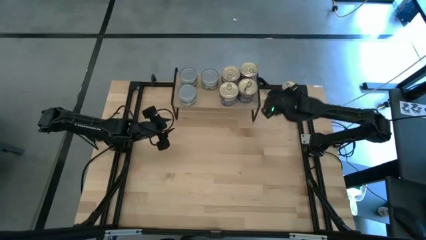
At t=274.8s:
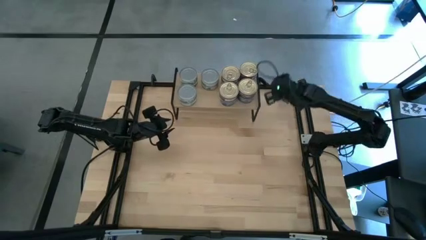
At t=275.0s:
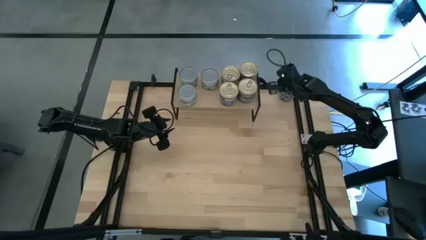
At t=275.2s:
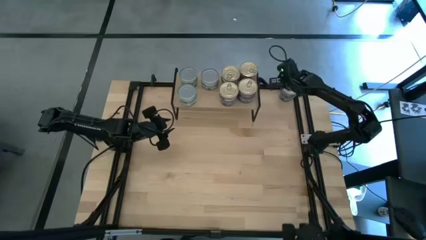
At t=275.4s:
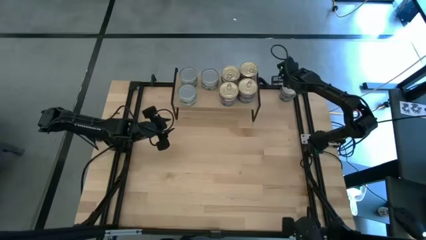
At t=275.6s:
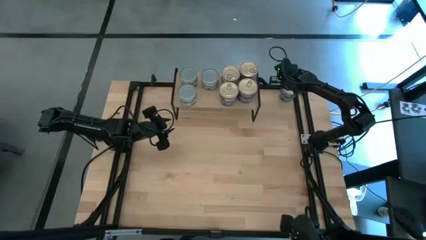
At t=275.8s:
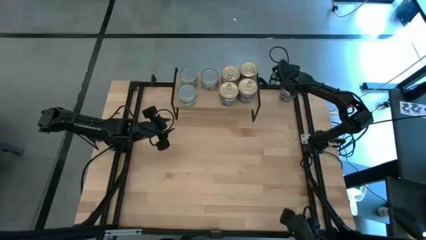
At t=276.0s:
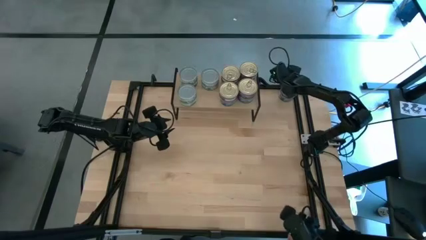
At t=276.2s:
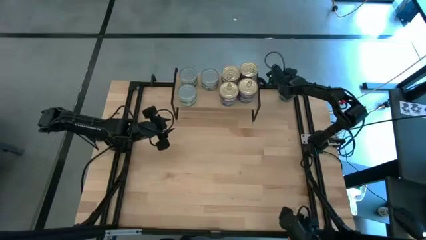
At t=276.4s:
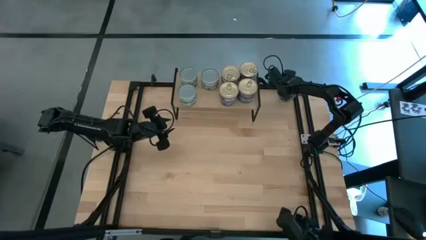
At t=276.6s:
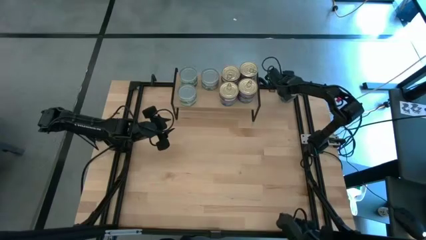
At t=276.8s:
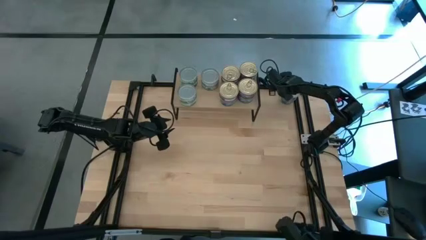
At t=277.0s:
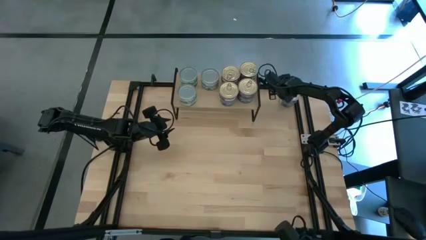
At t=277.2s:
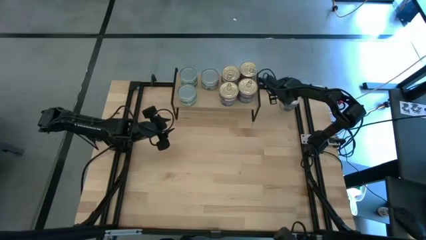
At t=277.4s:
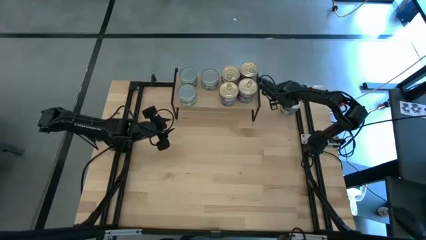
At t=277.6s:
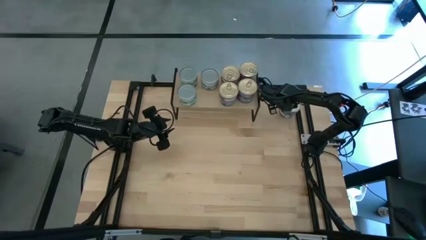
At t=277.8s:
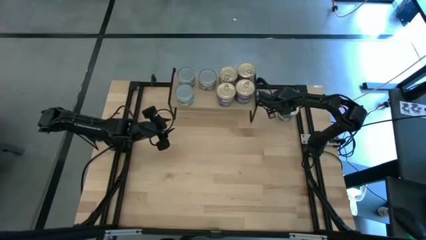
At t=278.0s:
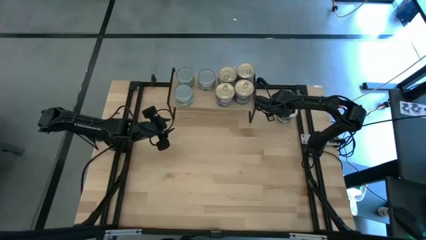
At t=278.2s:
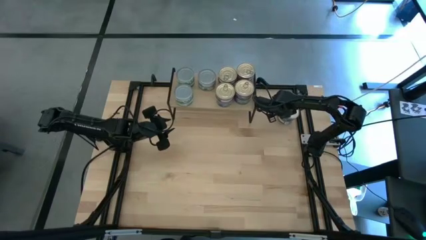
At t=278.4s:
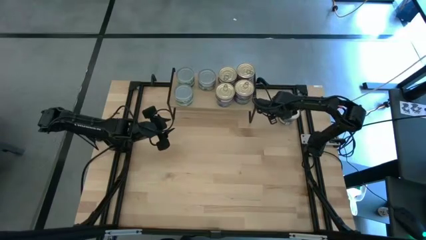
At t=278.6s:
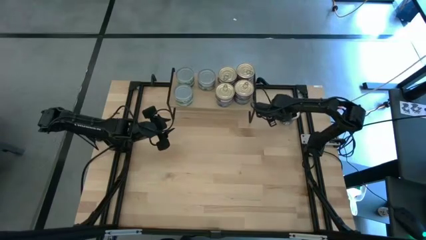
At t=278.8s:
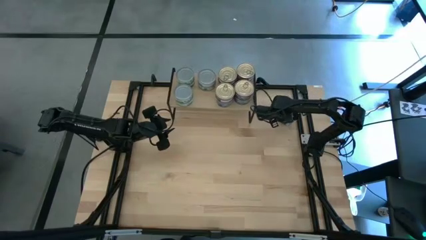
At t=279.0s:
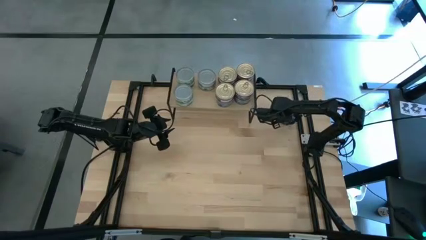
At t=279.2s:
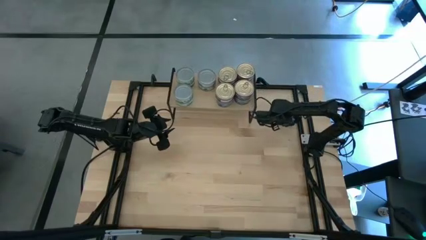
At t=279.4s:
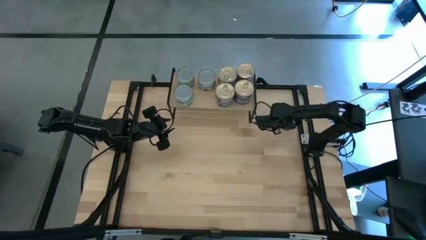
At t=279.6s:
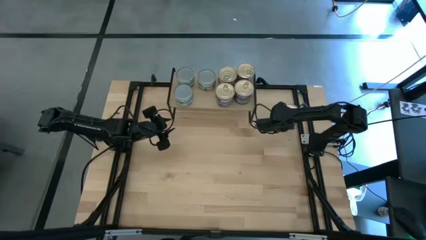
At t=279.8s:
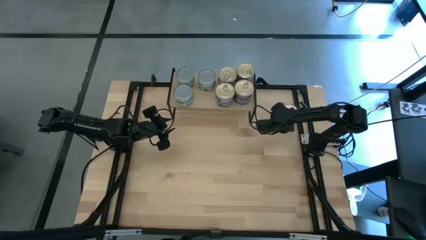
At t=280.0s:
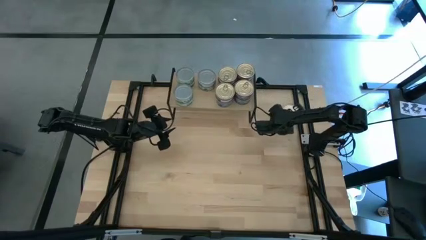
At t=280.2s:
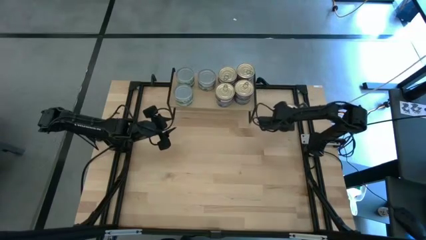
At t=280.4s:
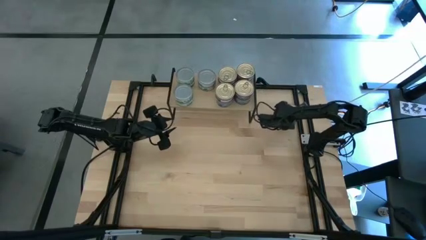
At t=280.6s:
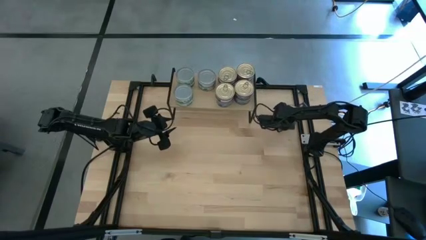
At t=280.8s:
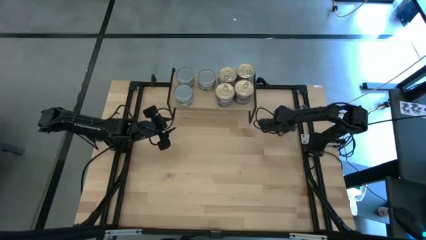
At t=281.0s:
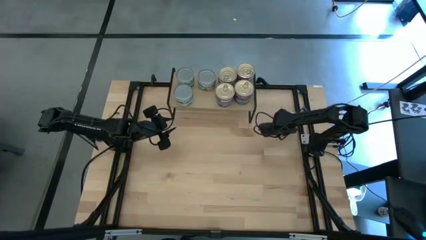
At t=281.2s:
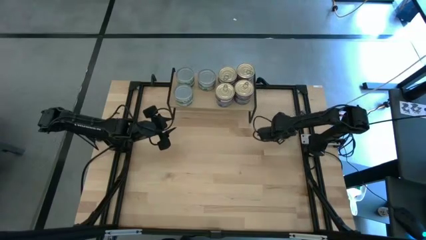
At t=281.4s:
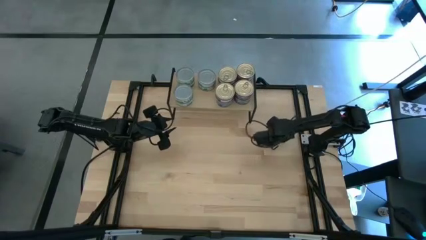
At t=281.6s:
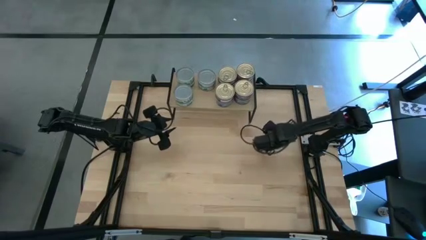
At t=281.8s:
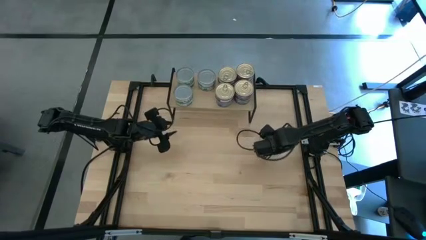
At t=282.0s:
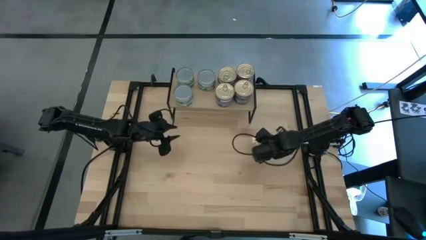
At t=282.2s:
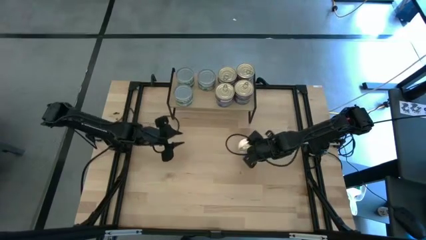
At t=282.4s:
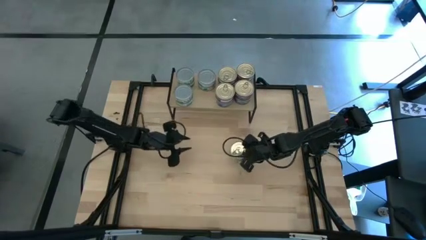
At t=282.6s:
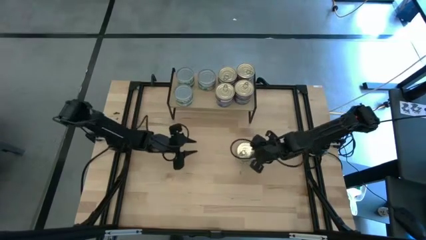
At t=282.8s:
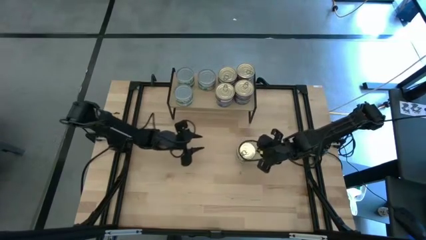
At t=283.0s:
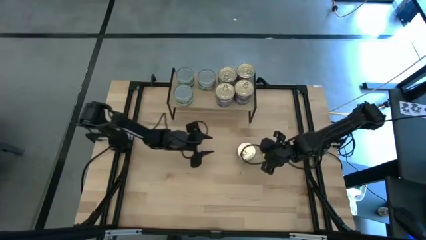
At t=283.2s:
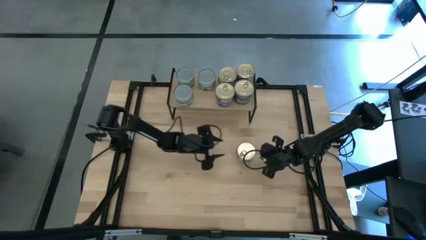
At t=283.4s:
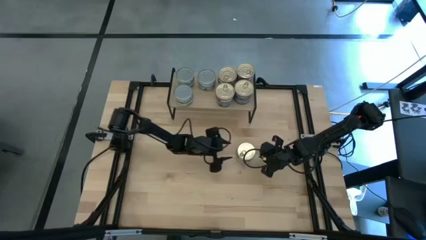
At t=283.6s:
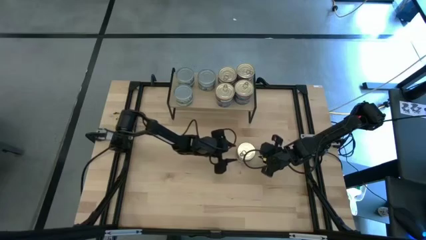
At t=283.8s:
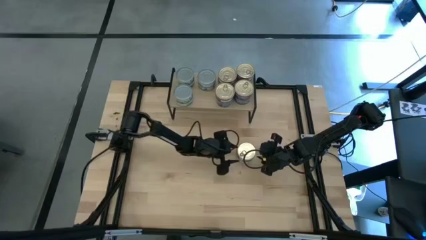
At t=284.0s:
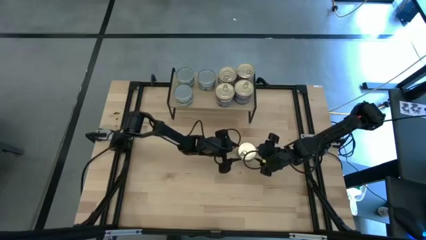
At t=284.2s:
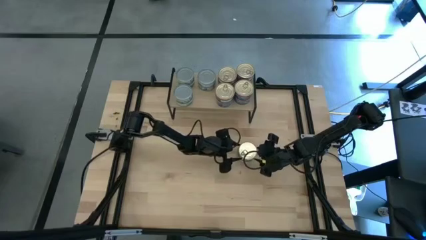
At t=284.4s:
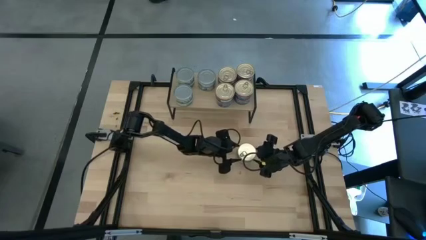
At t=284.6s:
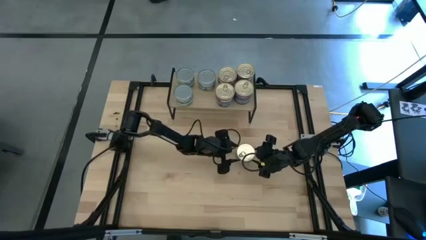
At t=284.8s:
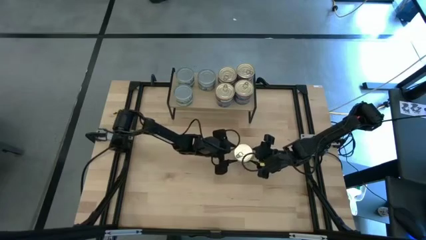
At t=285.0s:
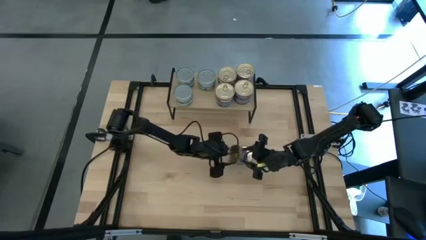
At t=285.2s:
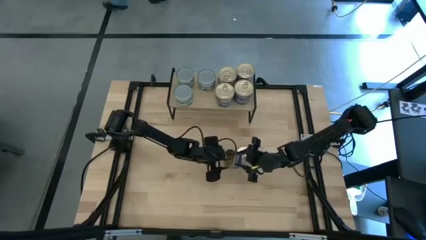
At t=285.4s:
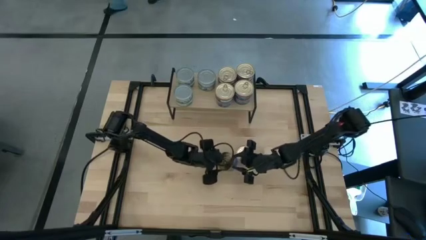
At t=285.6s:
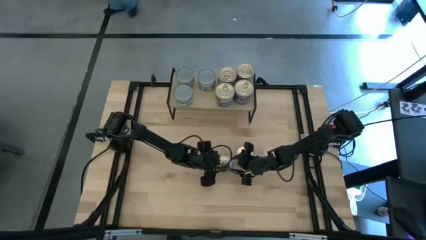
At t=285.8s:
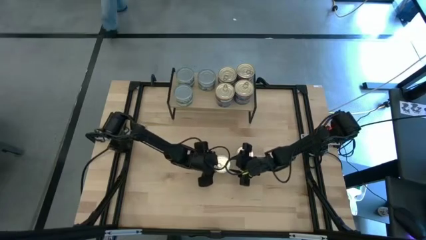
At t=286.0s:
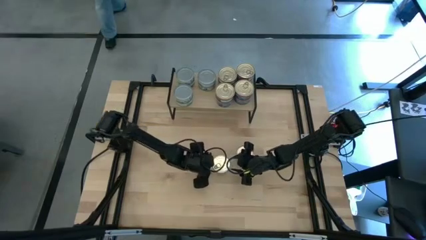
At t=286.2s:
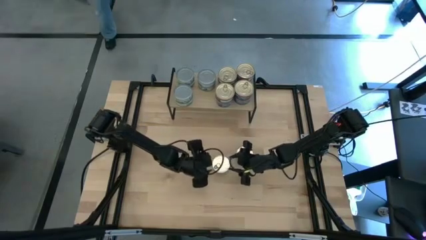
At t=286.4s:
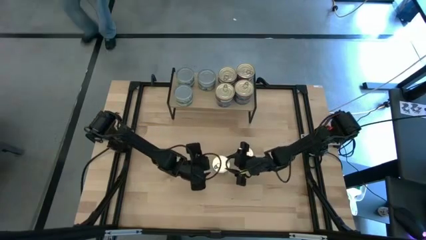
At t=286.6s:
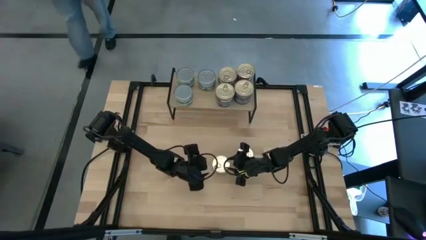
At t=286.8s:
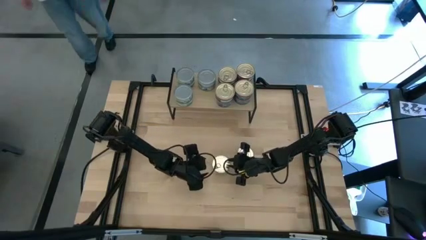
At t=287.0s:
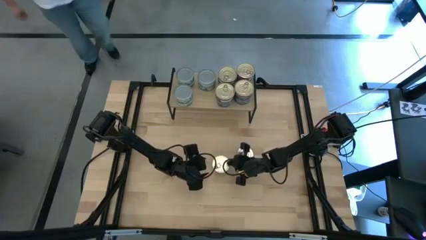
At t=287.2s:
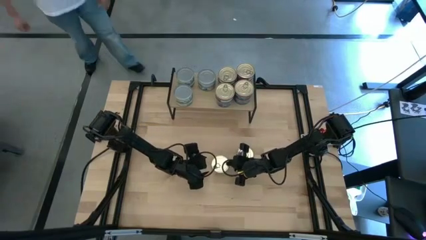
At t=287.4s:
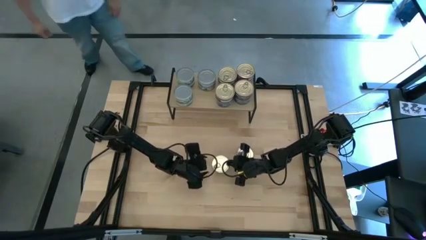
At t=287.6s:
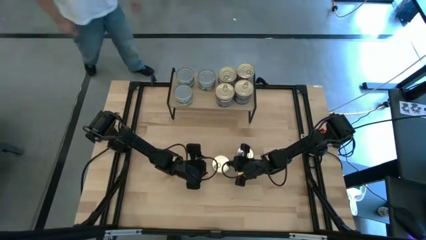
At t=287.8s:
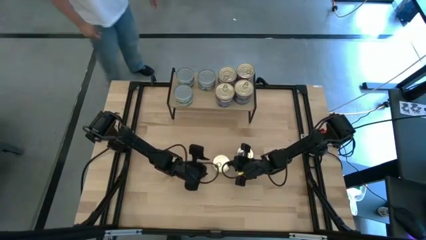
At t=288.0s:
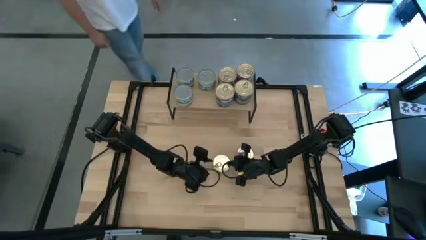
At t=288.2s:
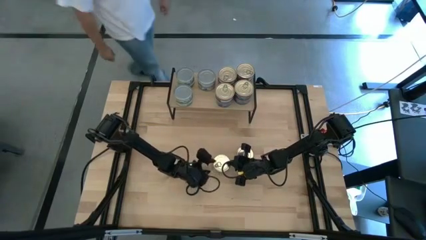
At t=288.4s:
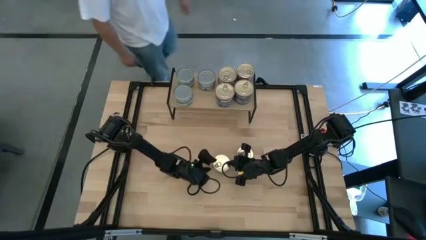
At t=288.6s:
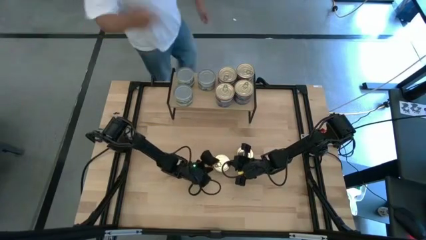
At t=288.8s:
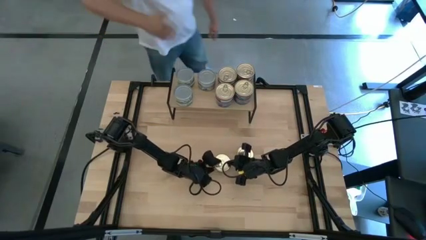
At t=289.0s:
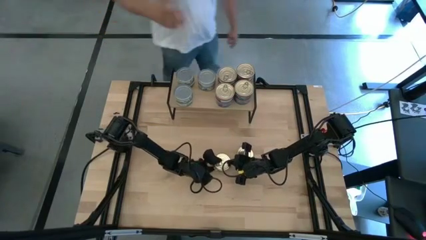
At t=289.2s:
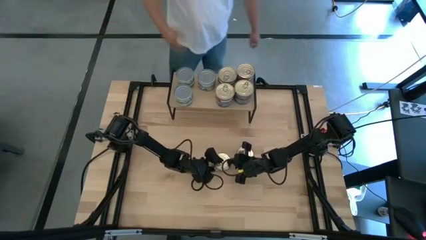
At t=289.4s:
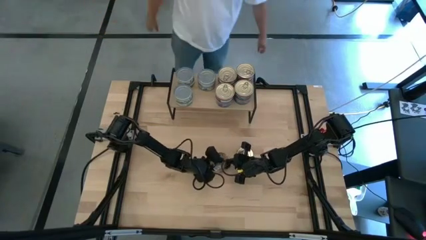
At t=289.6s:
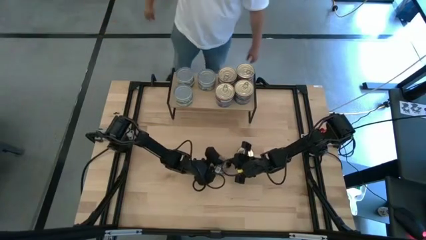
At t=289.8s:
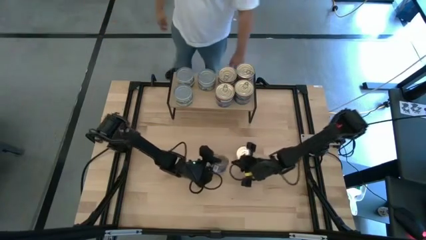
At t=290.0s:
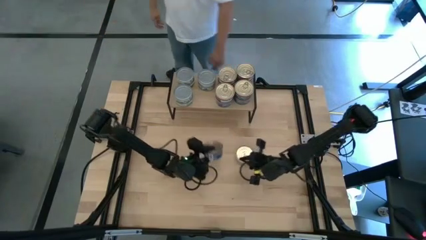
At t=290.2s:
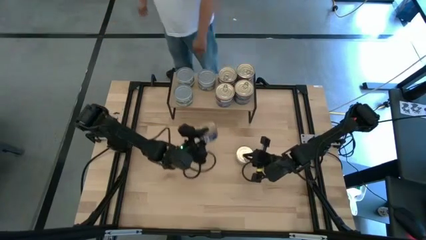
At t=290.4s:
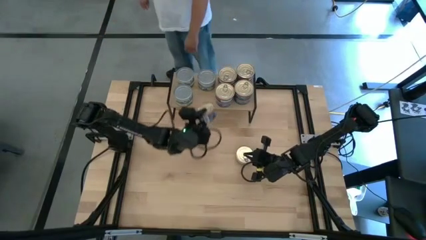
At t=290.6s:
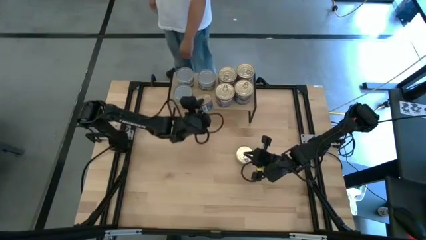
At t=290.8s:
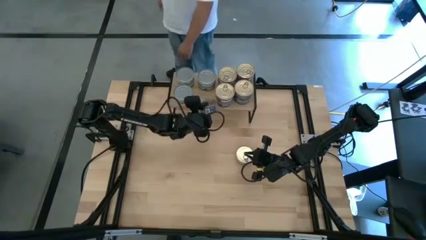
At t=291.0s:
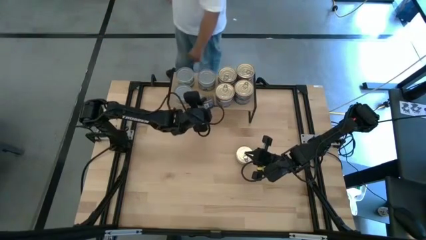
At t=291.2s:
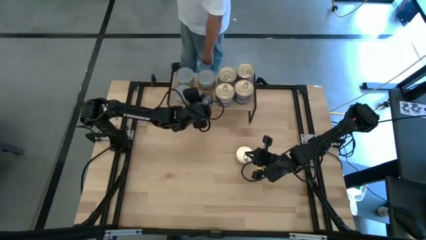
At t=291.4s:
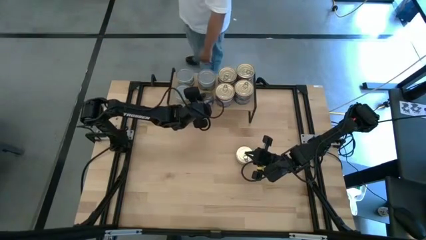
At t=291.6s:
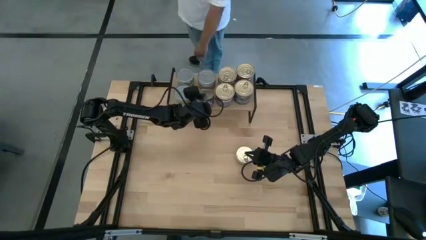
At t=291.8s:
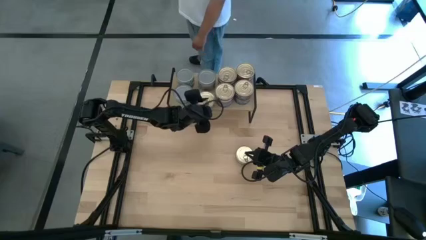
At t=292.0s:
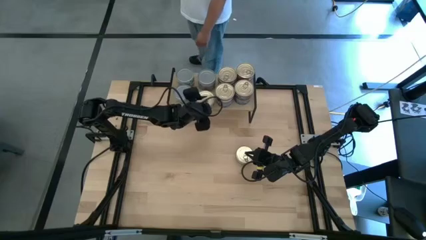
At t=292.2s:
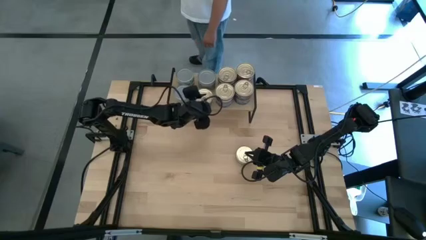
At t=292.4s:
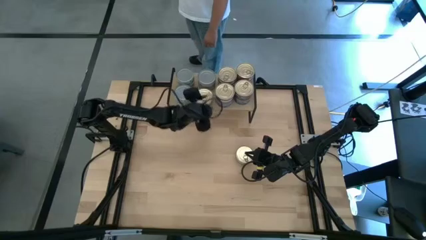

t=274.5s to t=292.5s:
Task: Stack canned seafood by type on shelf
Put the blue pink tuna can on the shelf
